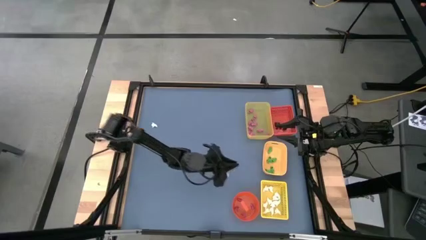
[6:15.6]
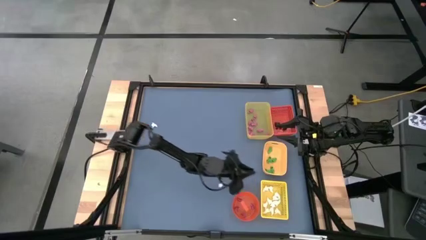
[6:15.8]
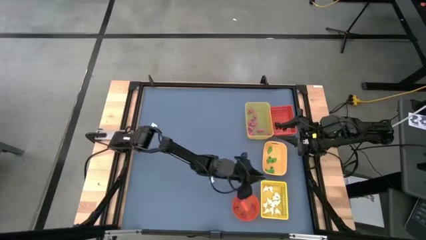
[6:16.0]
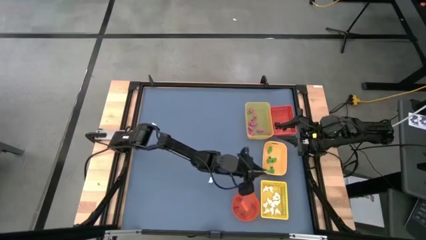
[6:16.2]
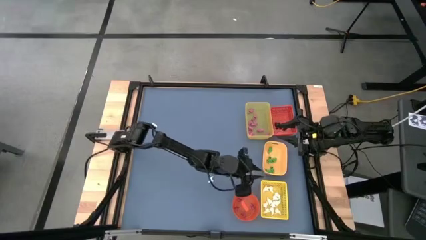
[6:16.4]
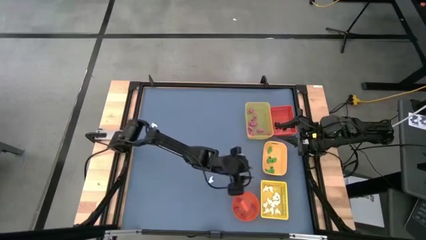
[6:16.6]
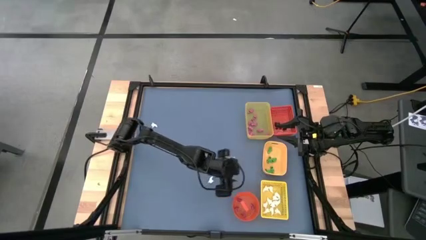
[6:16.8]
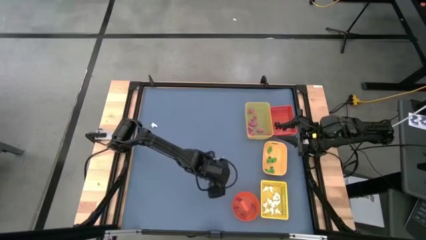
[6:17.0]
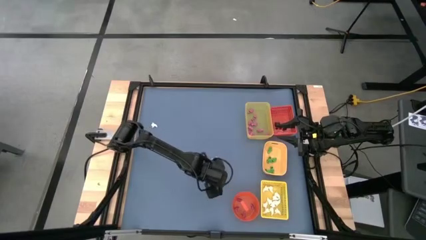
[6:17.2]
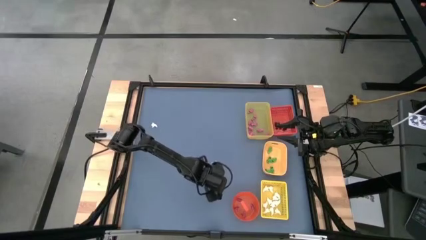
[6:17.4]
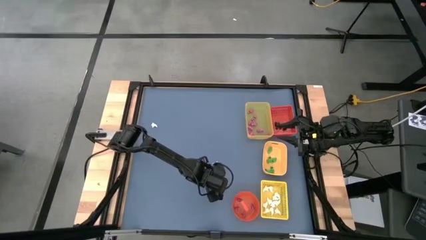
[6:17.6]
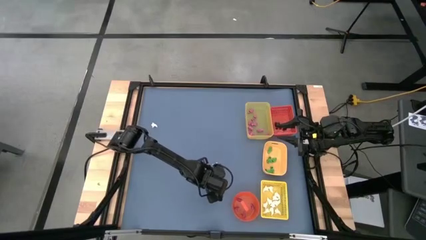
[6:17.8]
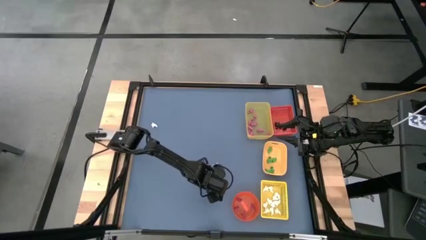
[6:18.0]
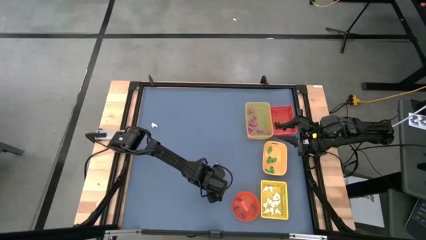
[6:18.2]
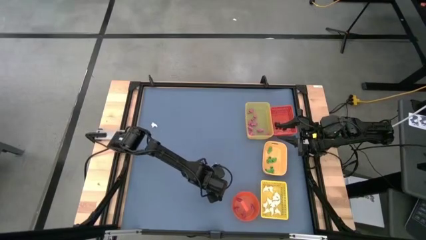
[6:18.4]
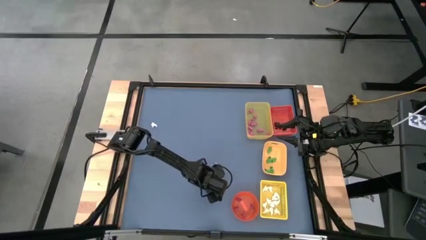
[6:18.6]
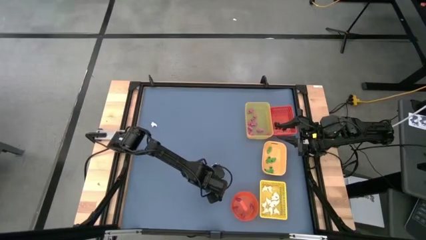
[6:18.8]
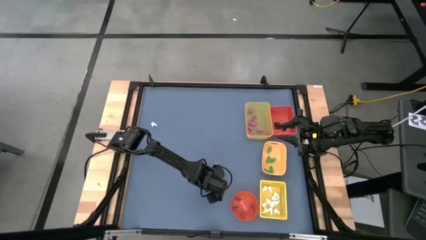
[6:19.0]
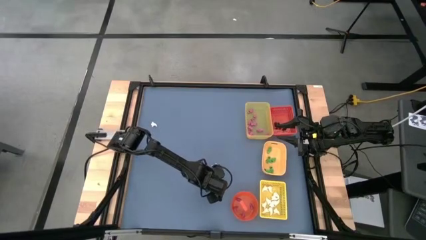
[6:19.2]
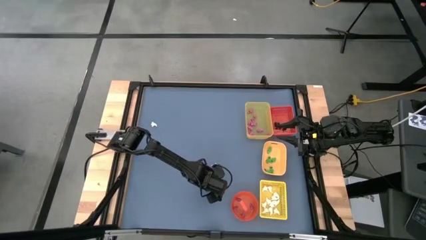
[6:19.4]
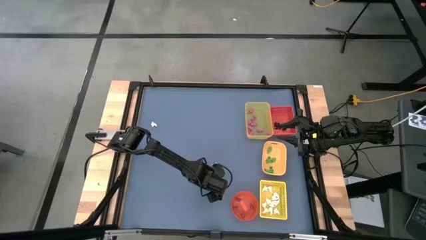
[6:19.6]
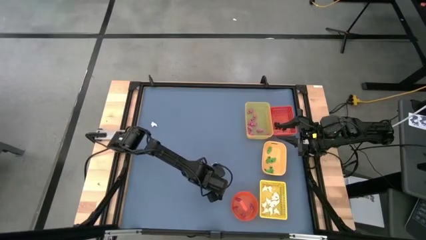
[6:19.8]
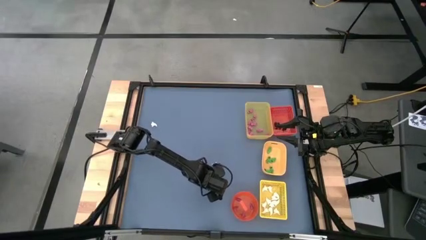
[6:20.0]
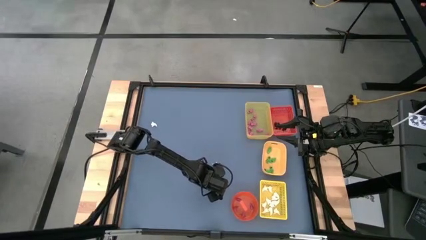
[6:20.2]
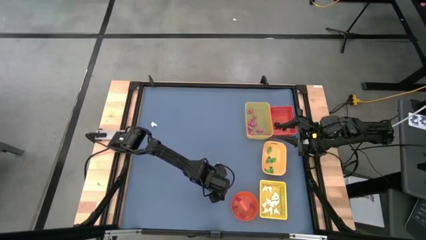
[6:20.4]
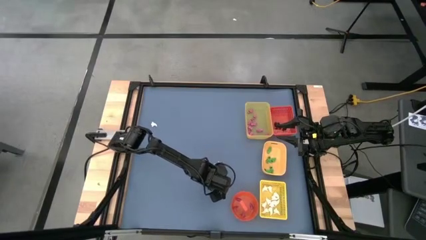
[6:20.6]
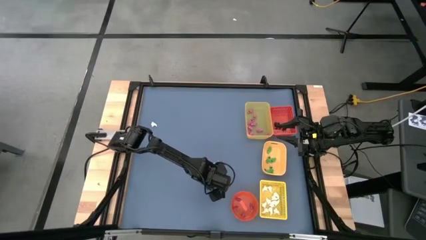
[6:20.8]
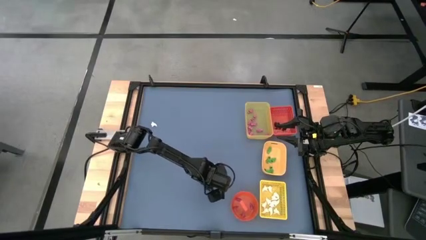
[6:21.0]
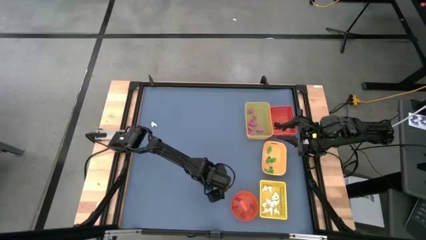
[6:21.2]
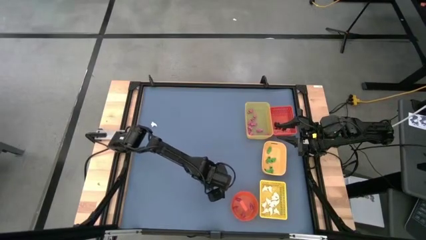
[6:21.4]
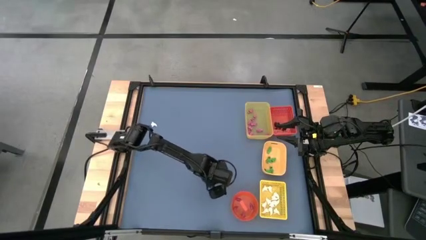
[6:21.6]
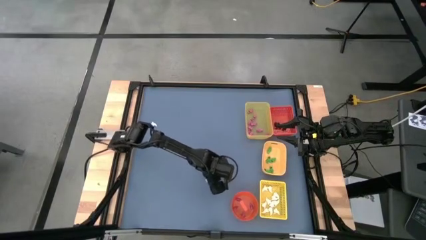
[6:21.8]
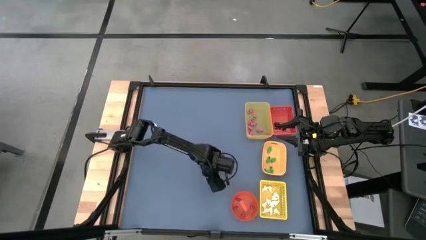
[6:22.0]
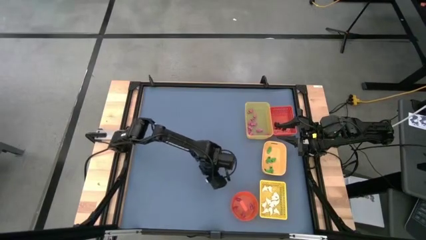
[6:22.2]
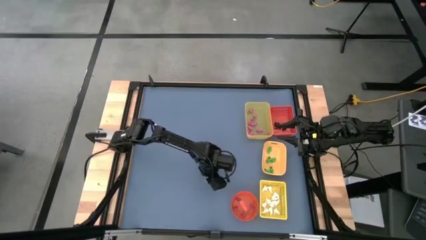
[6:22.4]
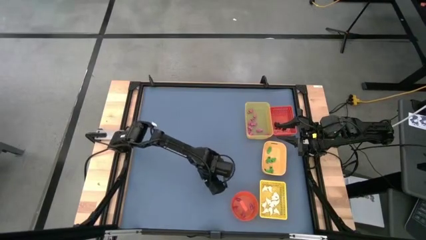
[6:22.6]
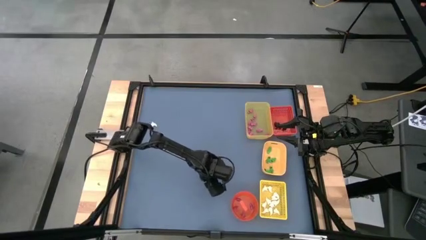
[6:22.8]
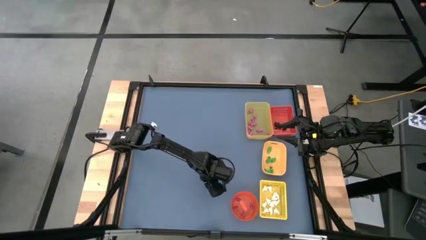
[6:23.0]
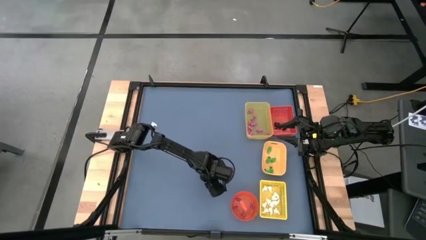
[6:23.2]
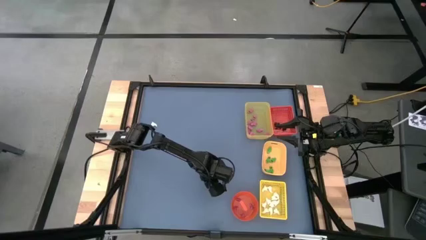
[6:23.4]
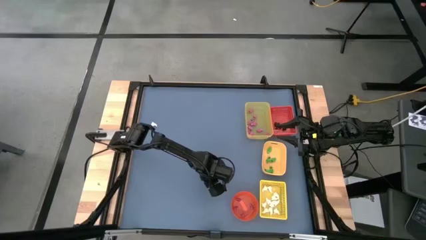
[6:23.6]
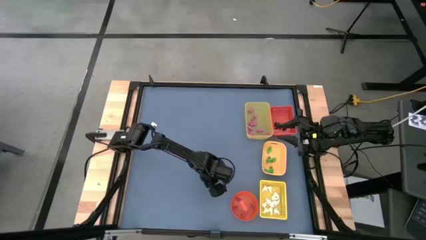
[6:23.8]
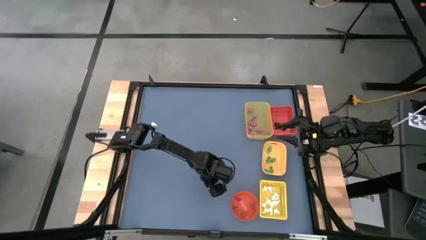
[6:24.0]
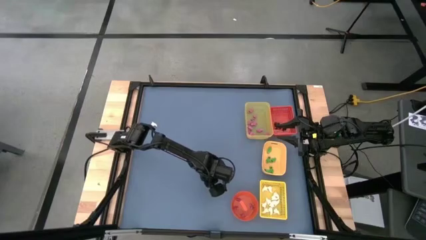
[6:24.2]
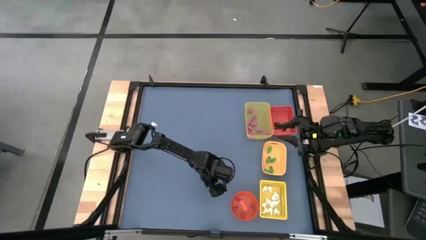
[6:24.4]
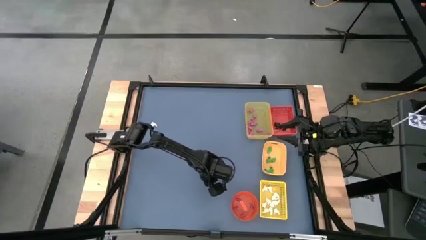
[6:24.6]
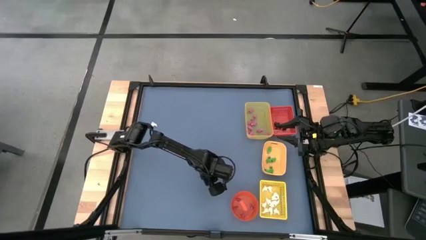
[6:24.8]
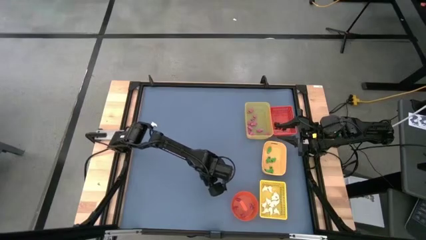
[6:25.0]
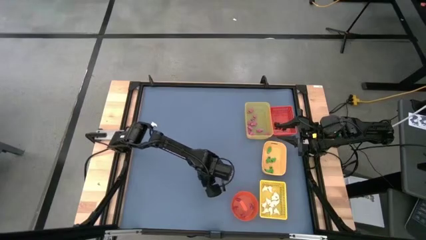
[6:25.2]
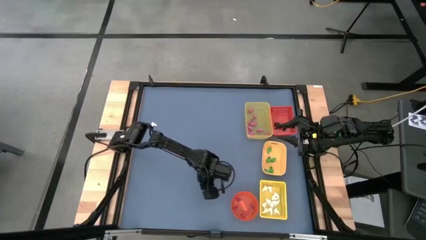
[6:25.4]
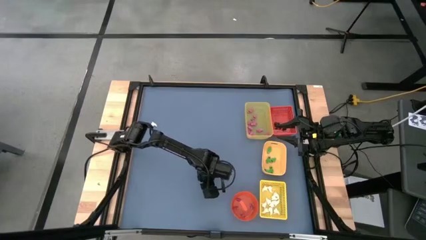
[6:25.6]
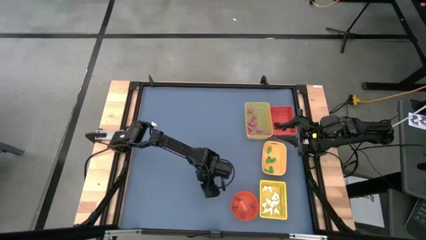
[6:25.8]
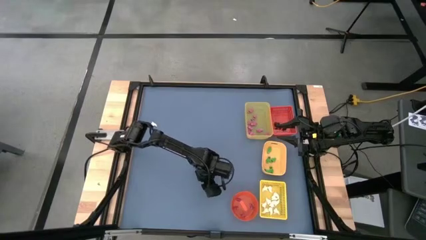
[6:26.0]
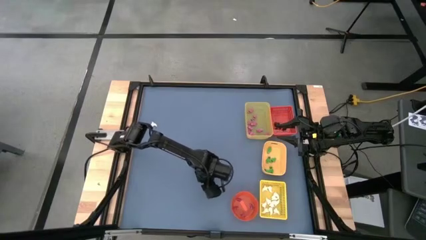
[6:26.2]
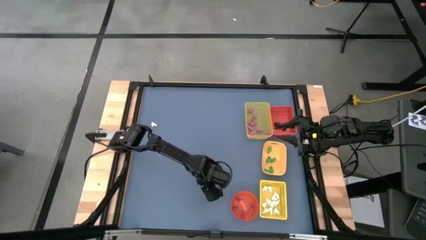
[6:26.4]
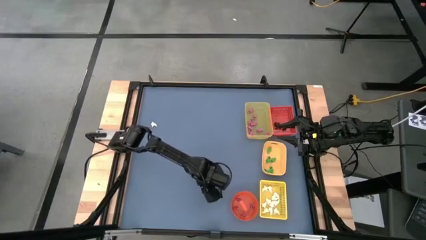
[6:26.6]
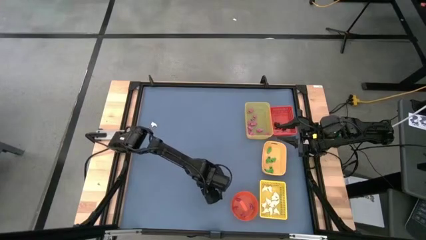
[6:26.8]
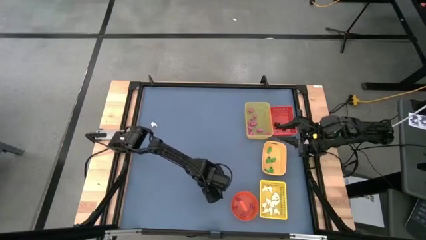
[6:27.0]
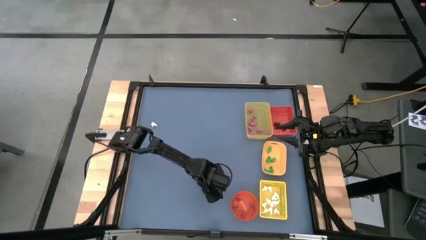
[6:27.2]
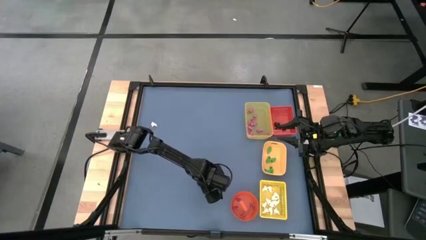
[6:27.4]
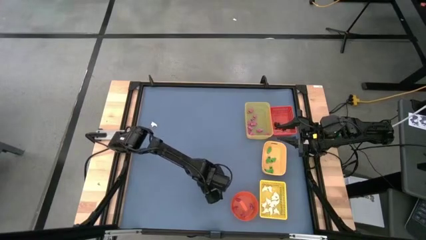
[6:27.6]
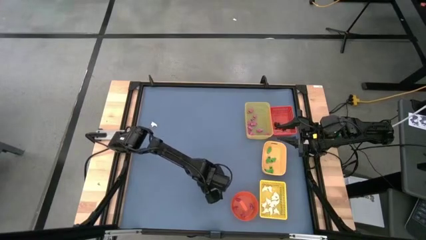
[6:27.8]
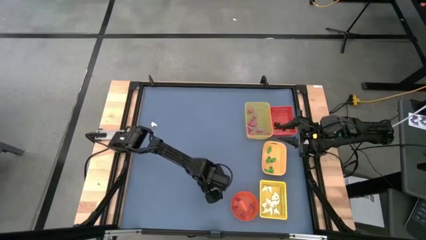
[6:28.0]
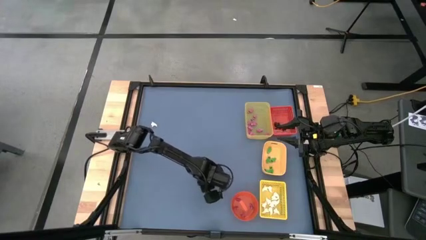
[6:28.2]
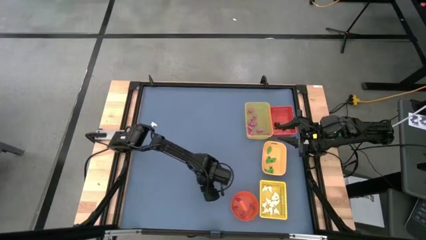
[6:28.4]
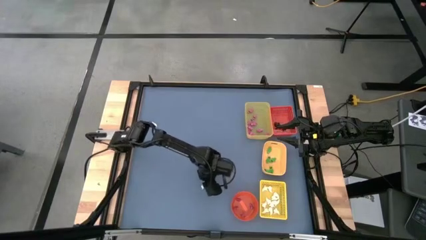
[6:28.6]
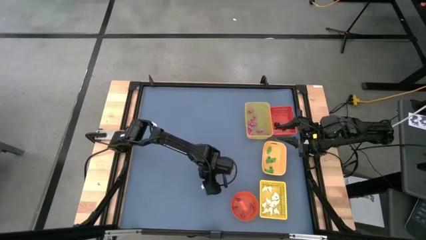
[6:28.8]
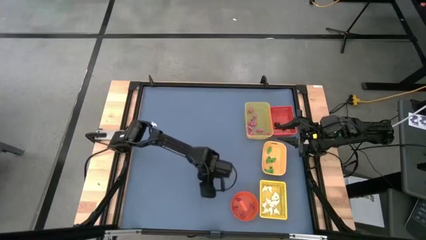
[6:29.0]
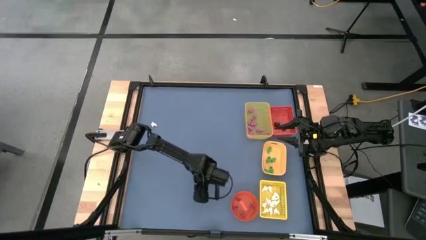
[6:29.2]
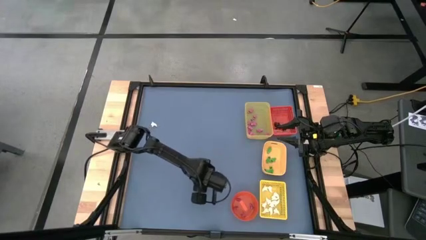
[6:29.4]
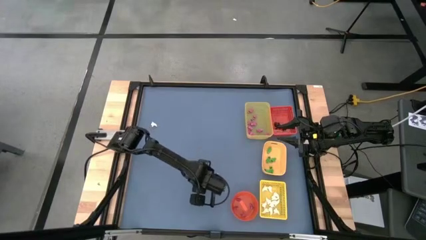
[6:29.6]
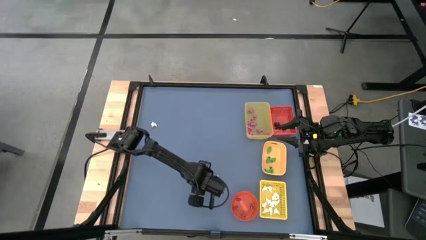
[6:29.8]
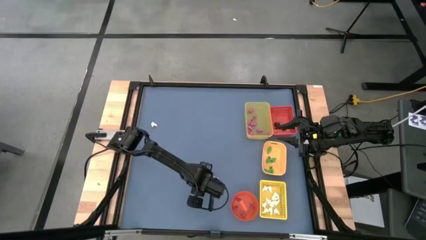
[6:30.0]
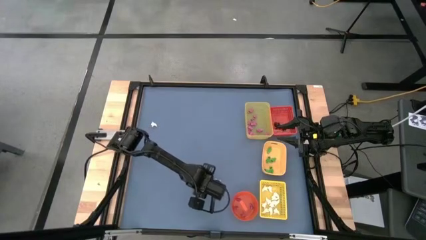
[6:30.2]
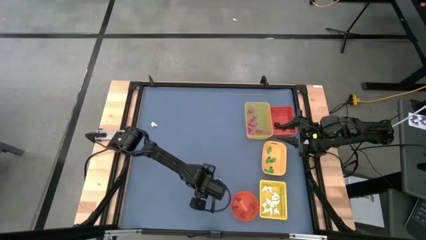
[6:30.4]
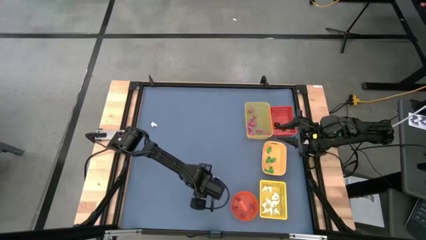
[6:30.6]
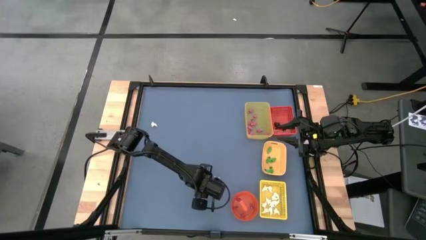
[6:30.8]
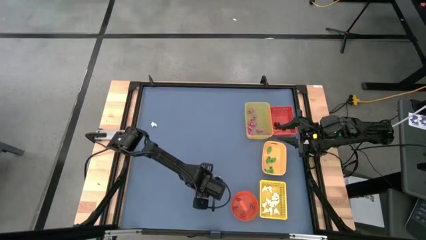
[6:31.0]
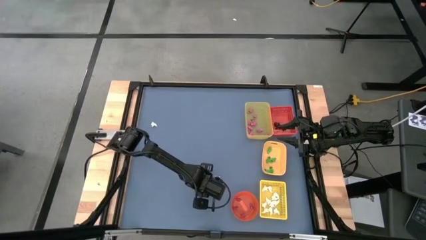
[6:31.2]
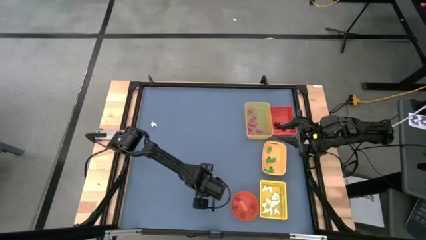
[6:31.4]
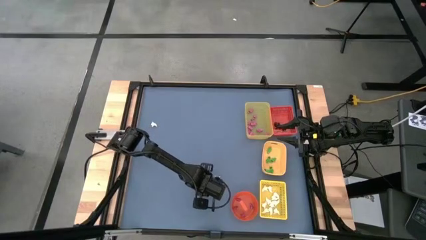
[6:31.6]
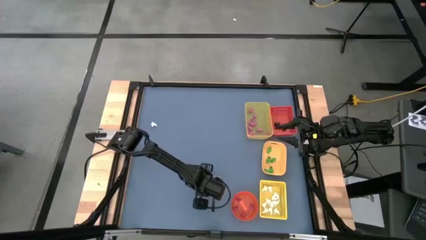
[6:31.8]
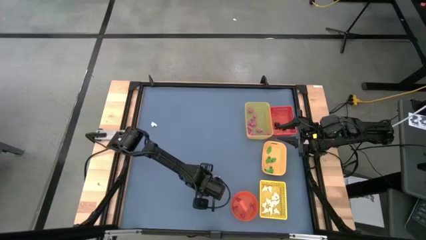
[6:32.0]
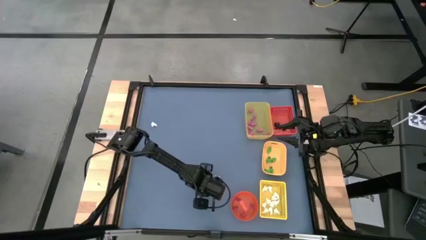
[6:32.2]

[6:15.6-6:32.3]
Task: Sort Halloween decoration
Put the white ghost toy into the yellow box
